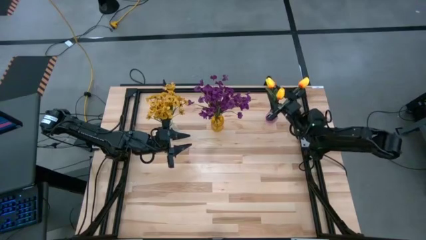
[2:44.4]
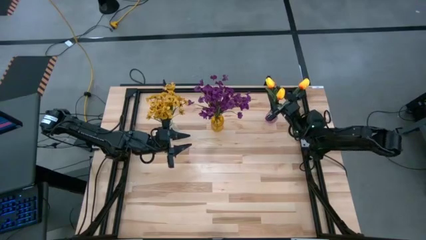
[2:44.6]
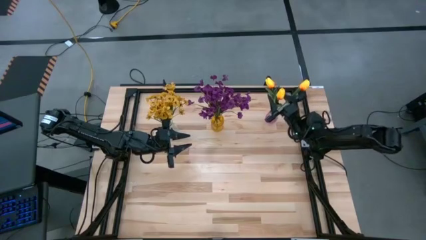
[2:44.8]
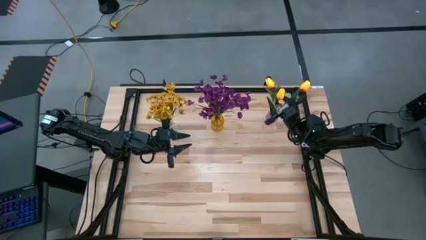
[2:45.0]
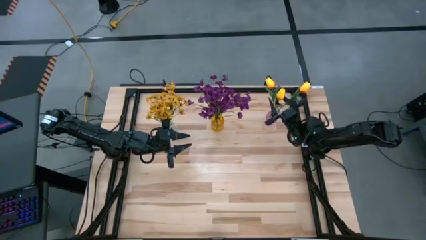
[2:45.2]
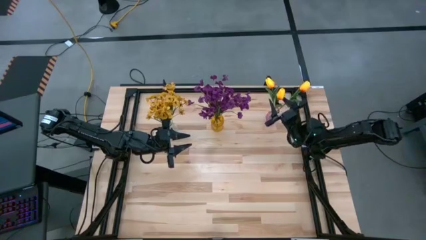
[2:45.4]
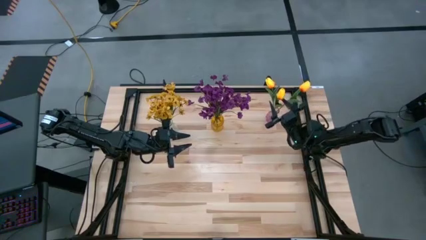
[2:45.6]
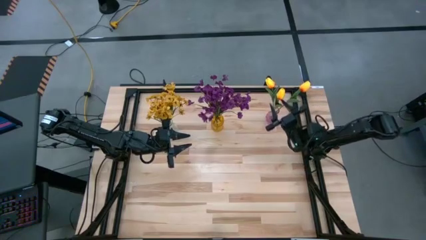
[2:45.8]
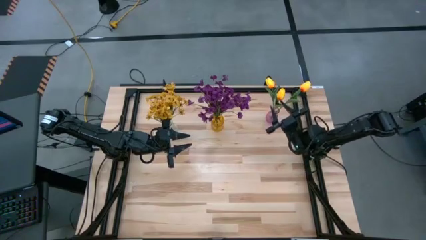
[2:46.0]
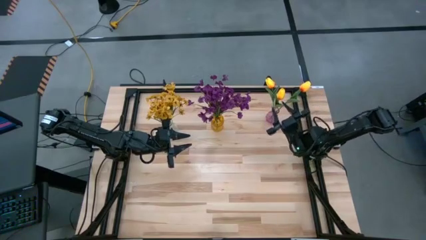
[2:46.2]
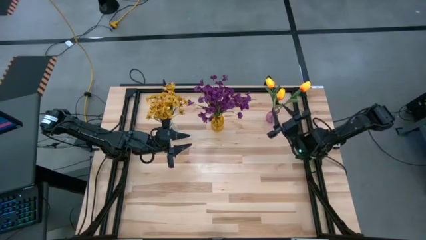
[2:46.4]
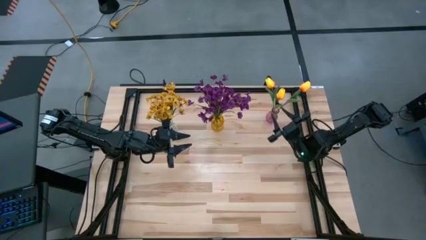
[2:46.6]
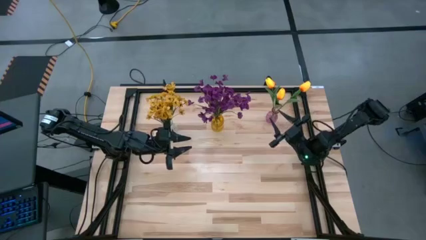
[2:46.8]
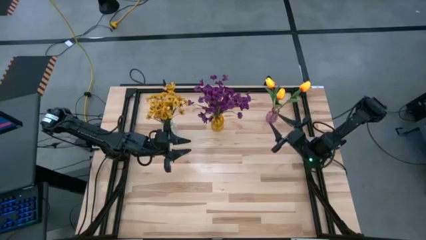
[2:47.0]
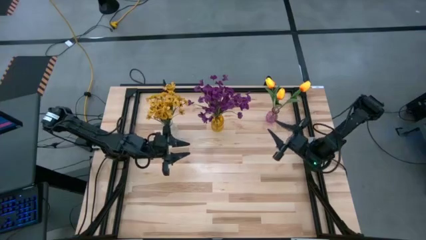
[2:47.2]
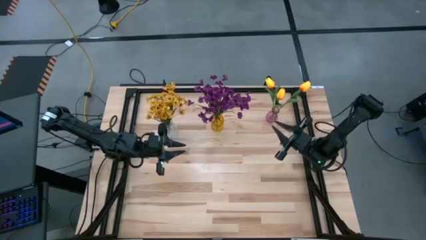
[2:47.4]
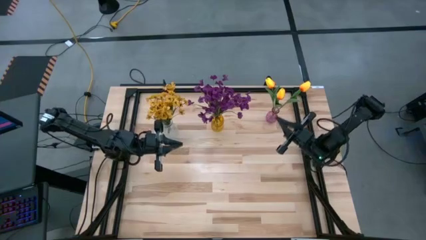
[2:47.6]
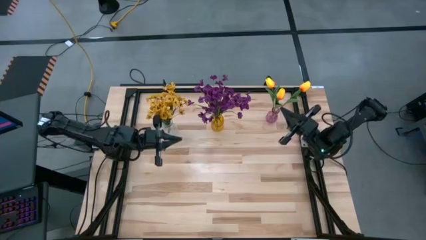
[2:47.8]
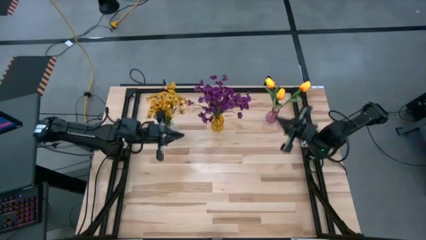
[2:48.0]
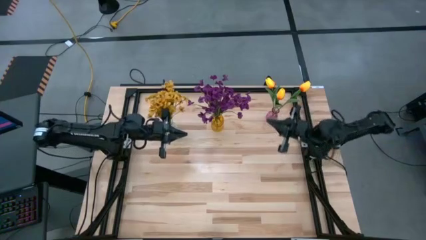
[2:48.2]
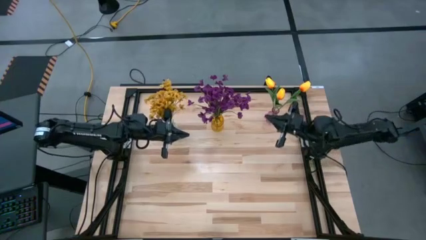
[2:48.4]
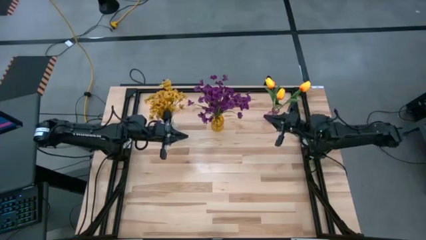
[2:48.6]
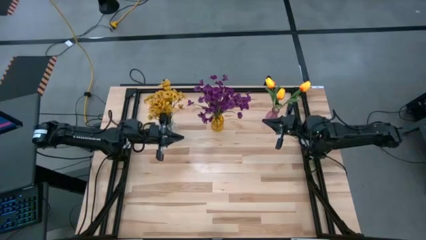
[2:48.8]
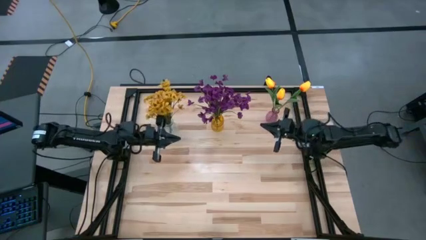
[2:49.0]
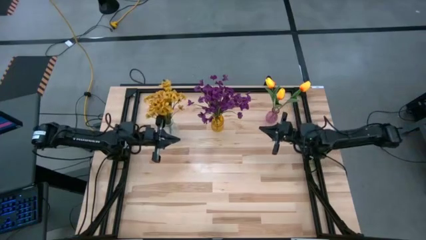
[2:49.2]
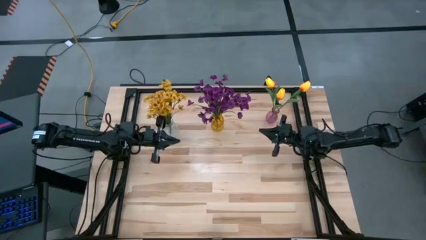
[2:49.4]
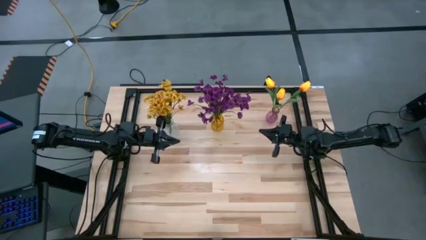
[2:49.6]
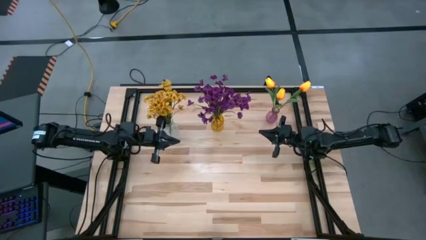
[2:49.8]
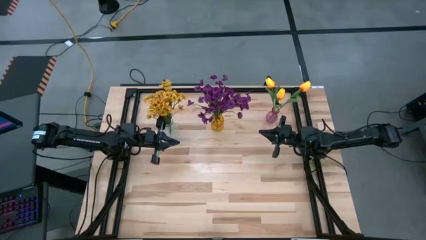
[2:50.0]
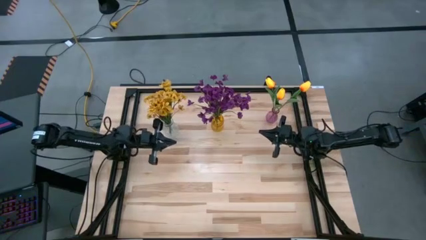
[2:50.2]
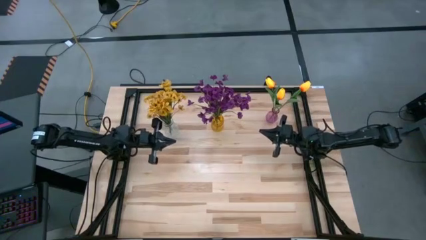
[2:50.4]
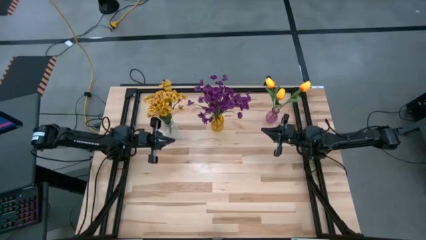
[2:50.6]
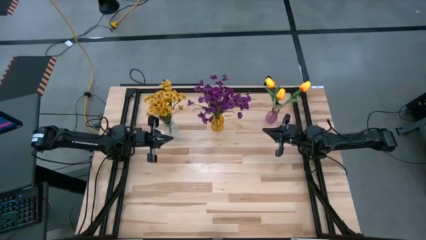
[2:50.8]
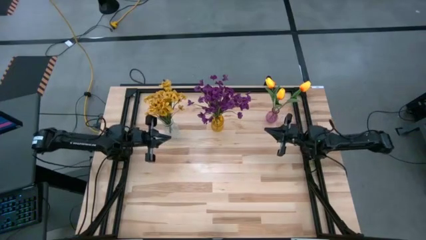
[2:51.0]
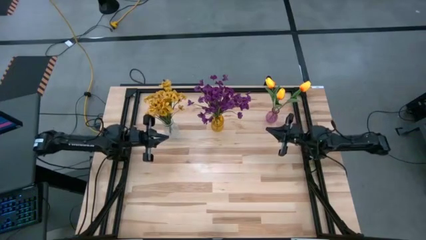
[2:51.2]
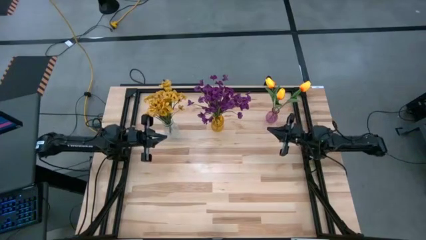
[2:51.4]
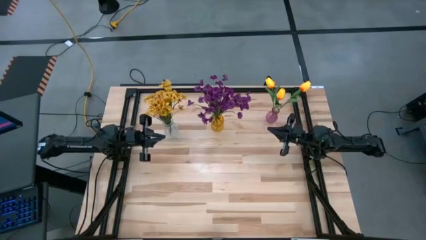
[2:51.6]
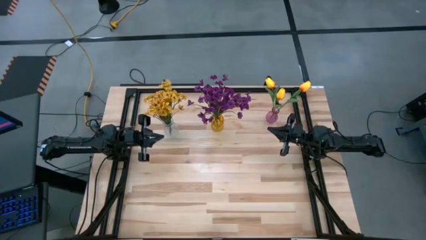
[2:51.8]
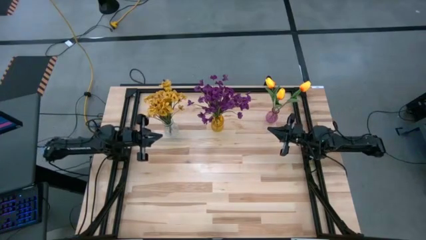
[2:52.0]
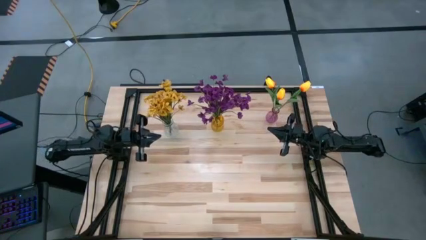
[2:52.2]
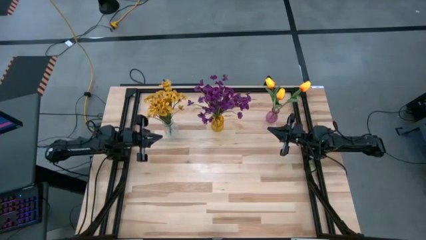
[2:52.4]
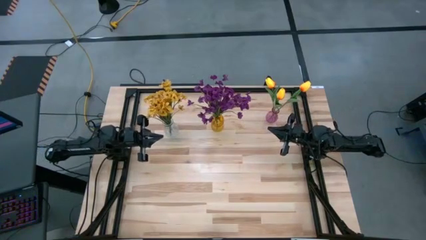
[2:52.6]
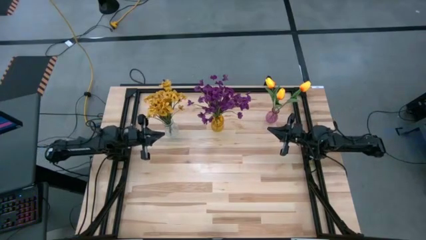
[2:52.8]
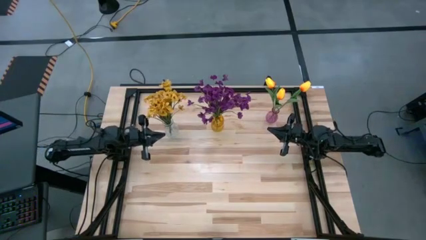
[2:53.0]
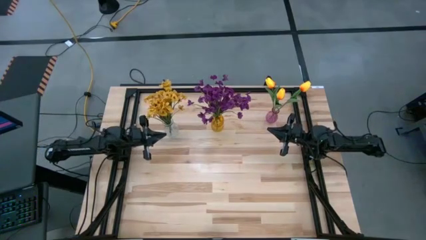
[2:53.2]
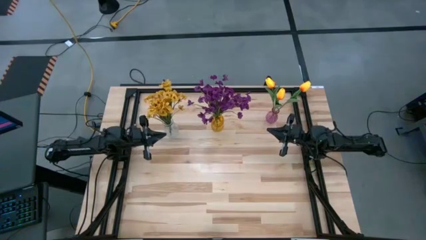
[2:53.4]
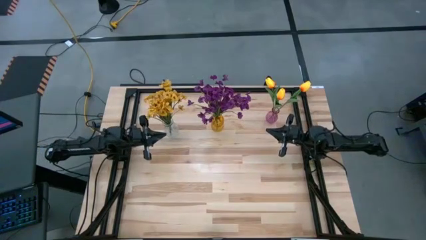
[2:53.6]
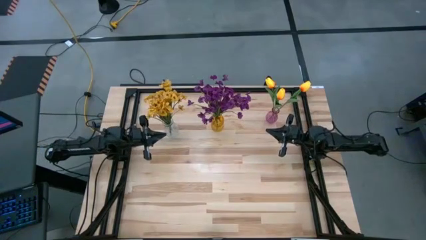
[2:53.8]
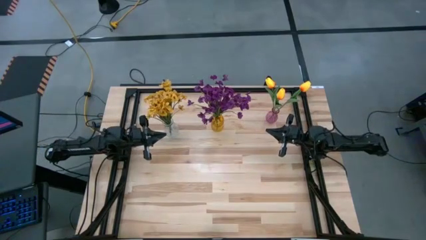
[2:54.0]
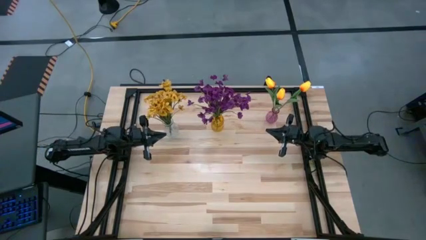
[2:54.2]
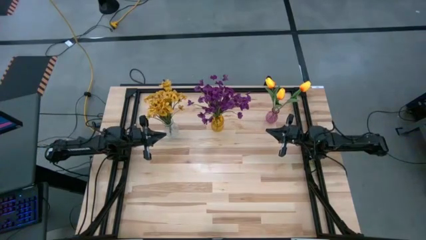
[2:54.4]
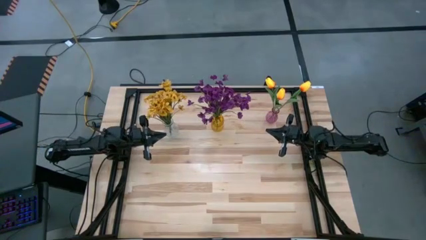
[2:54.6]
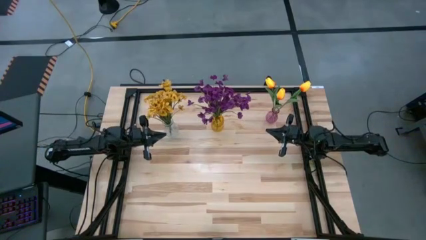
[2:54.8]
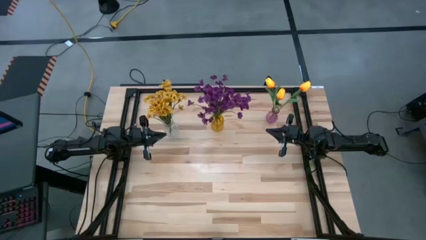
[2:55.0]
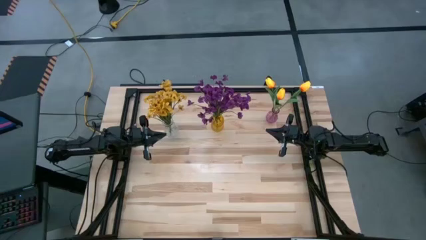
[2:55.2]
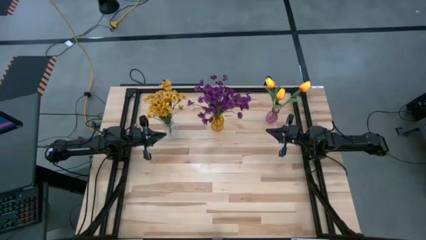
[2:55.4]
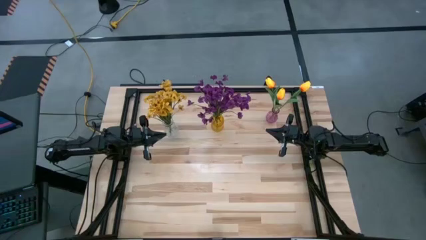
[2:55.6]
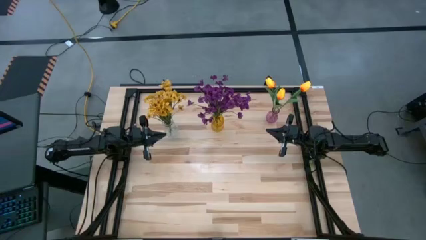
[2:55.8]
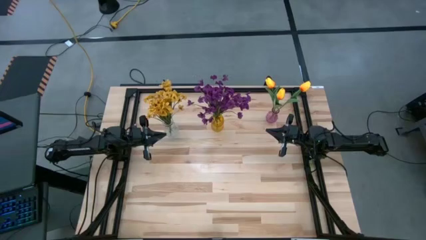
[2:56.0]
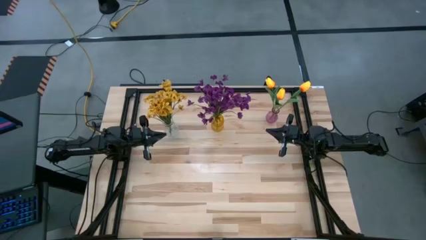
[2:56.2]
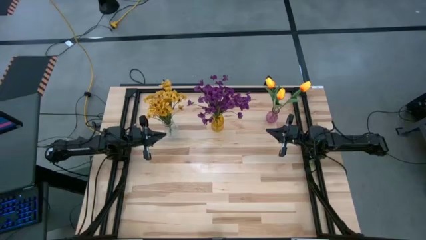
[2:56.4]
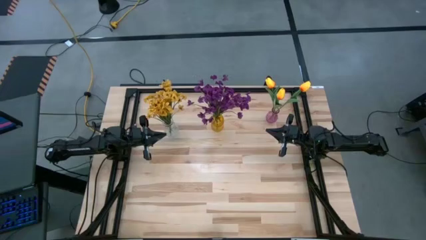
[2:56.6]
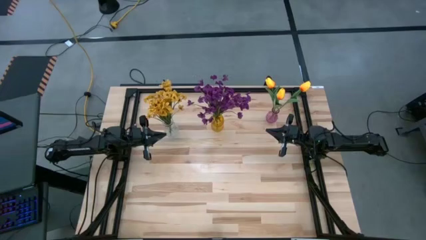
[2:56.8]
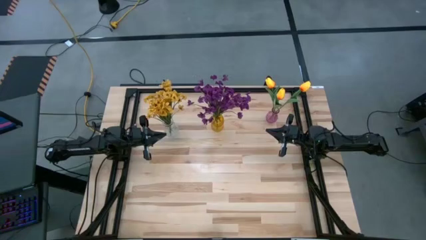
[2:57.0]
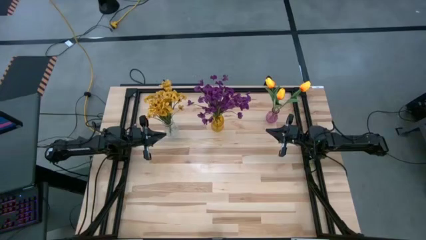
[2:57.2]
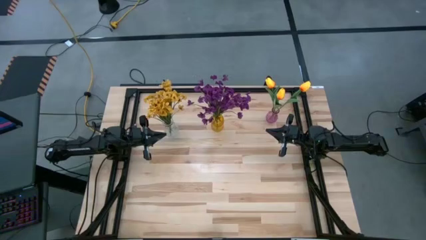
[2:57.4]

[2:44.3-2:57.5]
Task: Sort flowers into vase by color
Return to Home Position

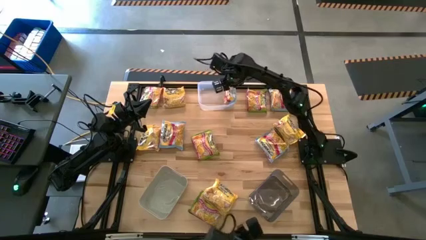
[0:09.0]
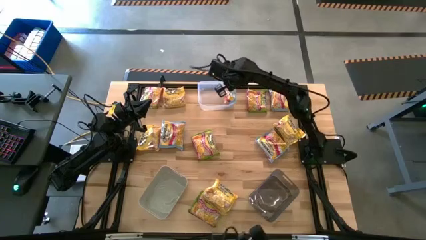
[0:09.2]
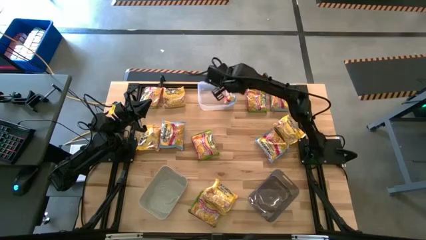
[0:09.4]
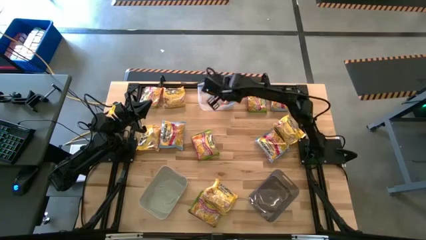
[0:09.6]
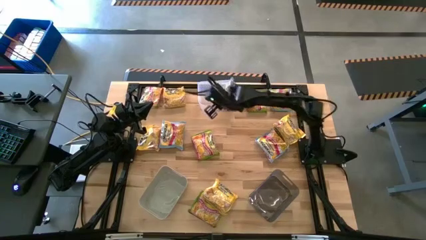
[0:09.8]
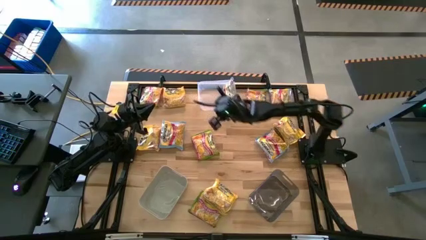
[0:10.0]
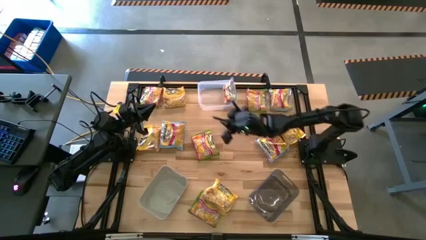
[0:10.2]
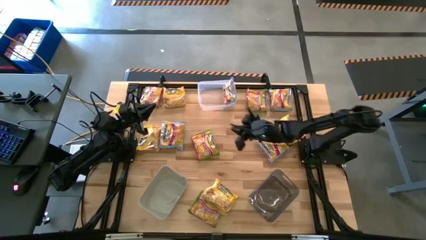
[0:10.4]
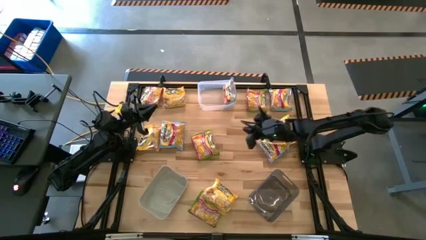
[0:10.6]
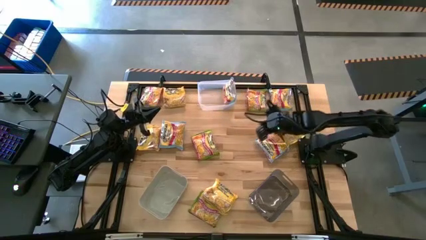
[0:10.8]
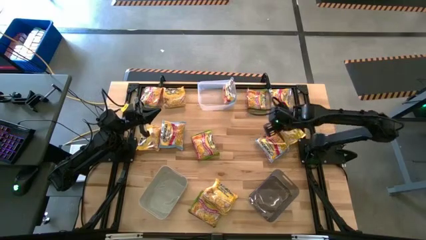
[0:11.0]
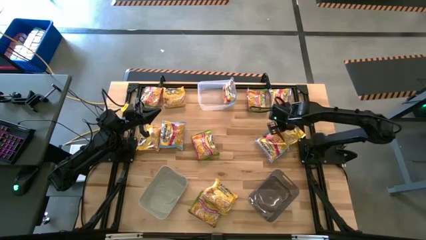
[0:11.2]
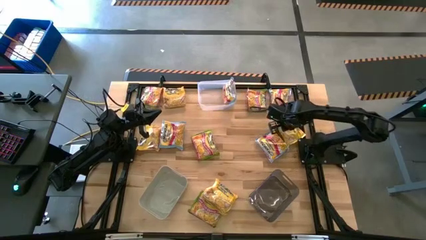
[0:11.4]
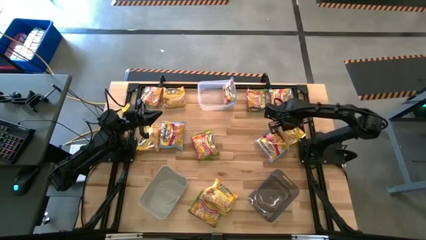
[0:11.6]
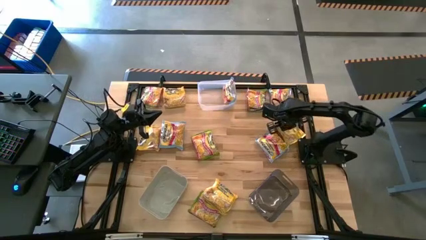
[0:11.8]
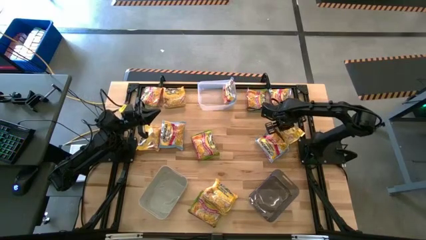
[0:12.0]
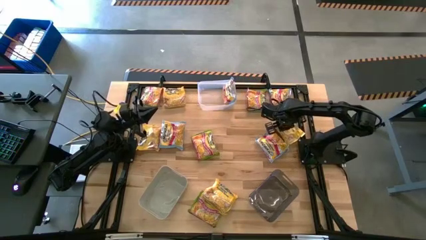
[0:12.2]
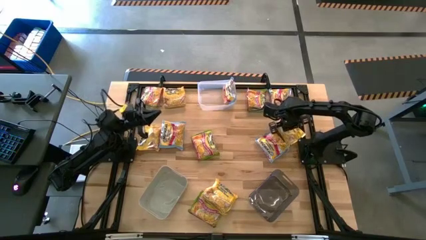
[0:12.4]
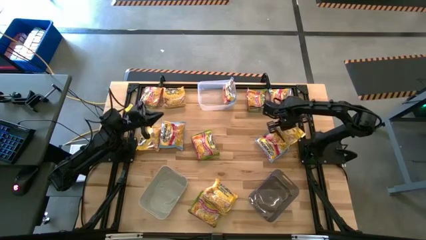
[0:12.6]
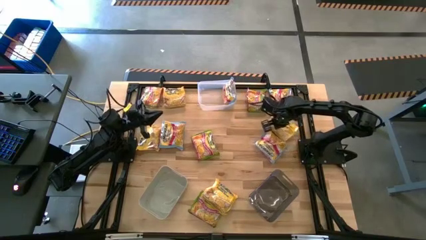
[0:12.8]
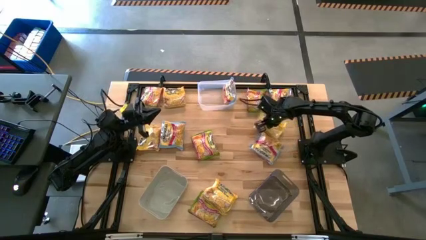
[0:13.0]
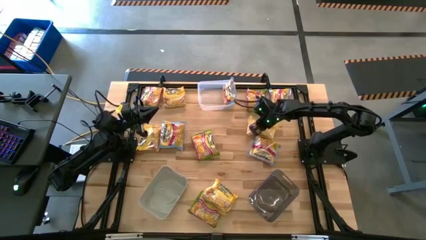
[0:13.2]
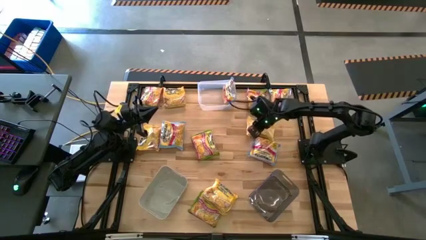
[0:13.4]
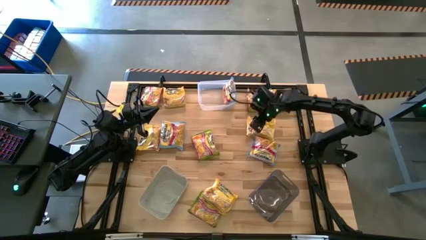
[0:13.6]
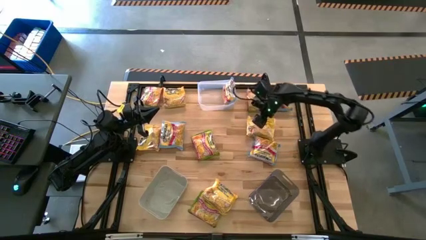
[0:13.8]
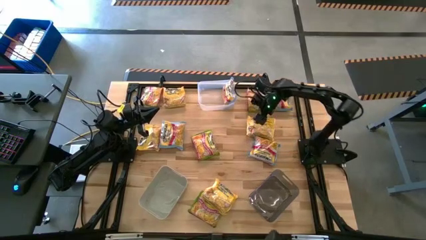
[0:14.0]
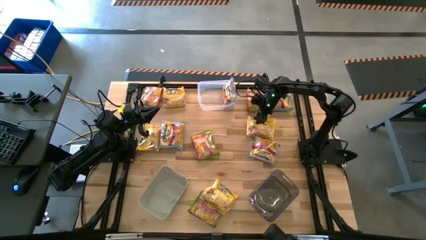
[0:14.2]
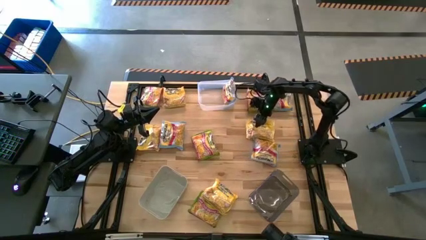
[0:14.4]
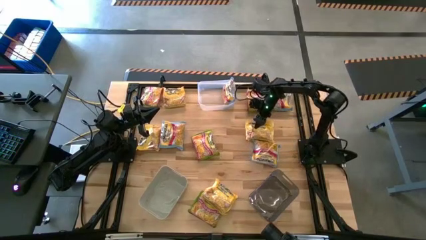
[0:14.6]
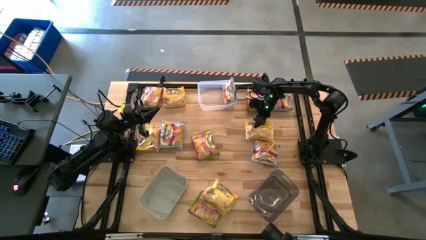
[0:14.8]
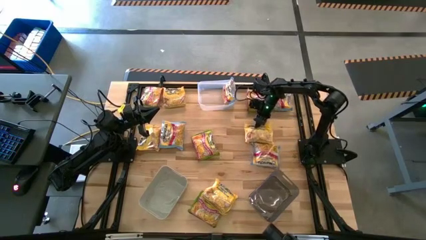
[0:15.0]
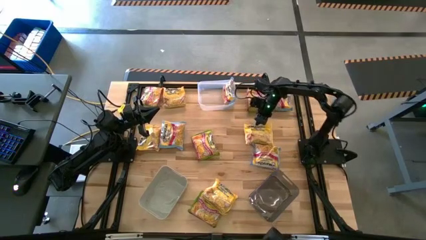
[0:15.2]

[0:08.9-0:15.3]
Task: Sort Maruchan noodles
Put the yellow noodle pack into the black bin
